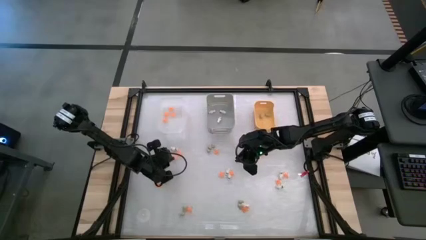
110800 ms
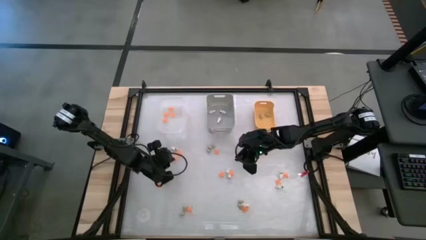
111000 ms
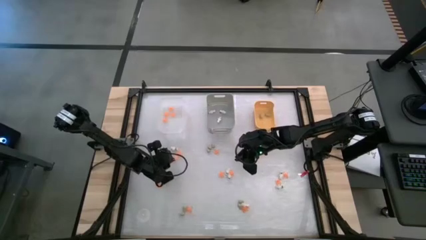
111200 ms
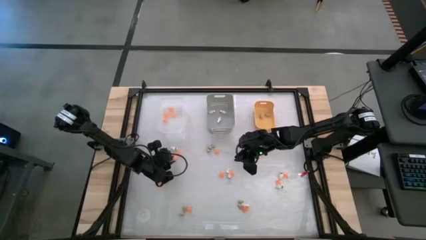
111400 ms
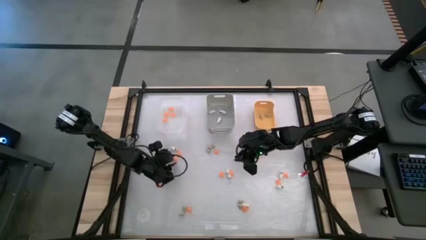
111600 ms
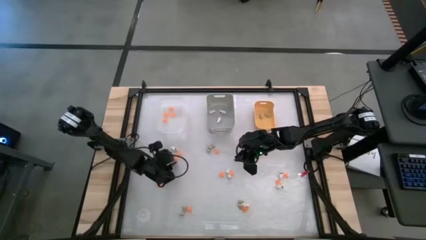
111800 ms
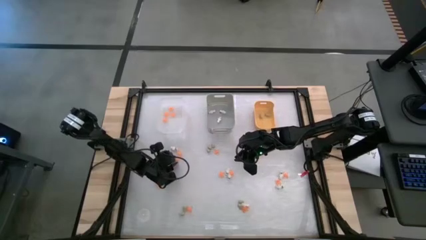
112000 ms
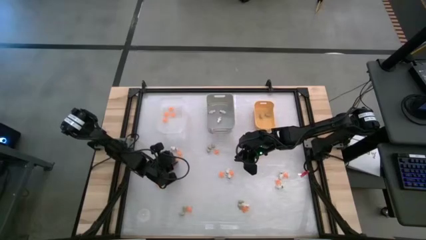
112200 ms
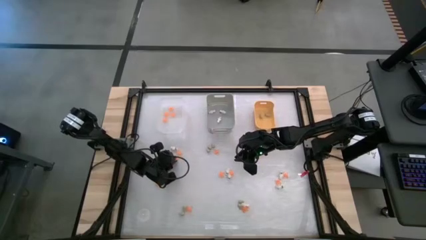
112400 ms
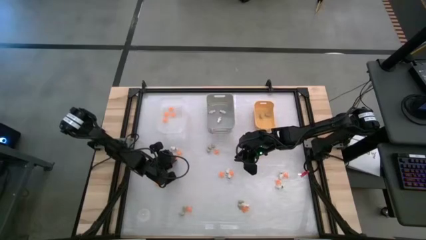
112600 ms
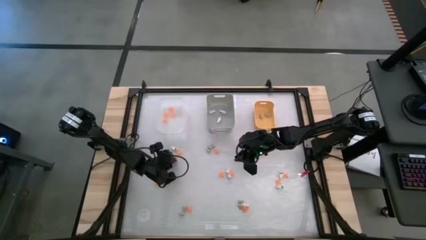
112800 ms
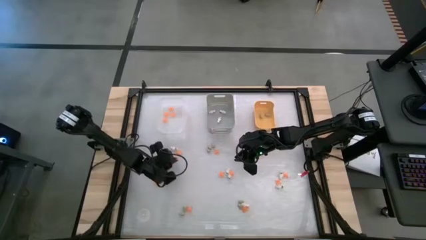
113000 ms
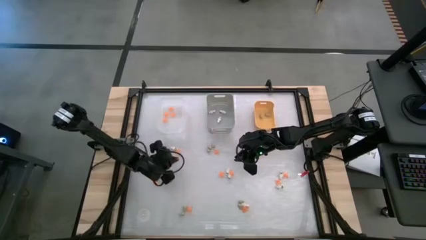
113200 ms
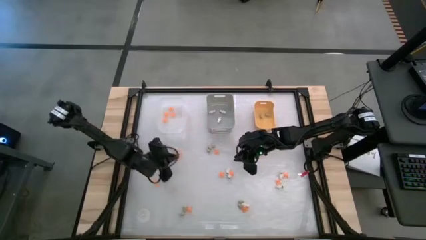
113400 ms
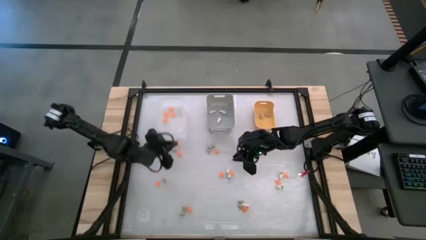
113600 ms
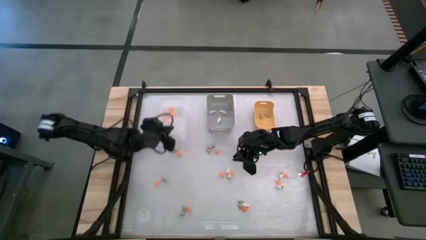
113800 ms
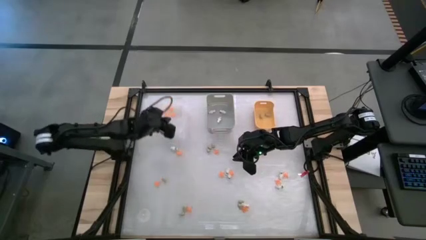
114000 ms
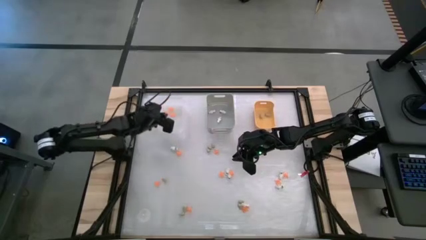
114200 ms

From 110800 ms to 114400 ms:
Task: Sort Halloween decoration
Put the orange spider toy into the transparent white bin

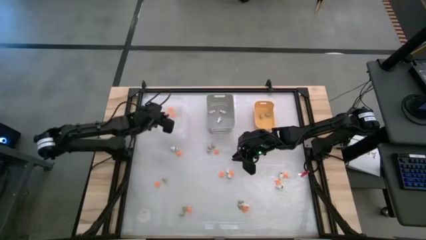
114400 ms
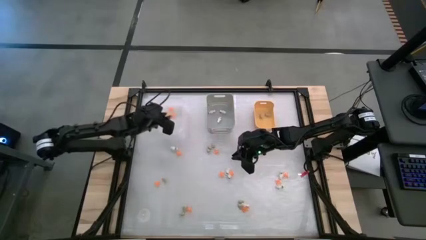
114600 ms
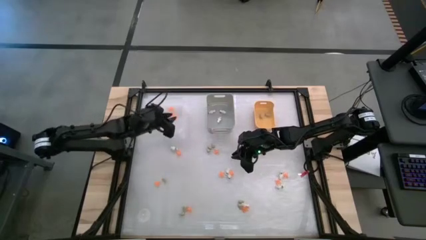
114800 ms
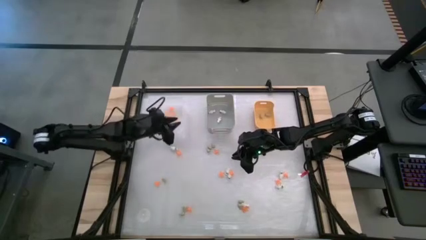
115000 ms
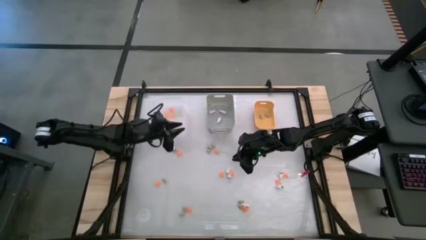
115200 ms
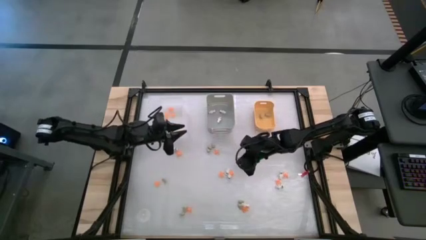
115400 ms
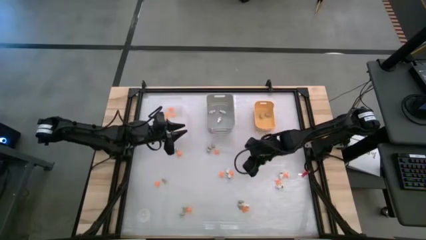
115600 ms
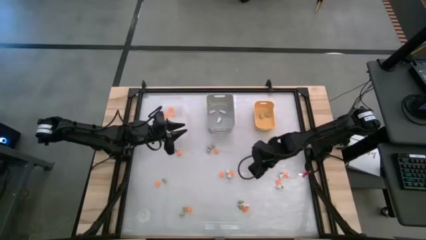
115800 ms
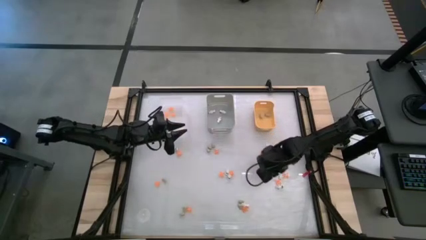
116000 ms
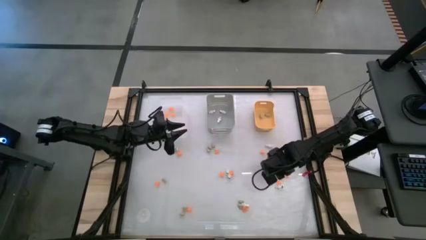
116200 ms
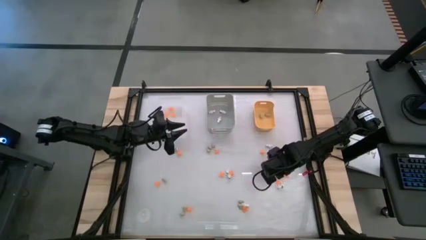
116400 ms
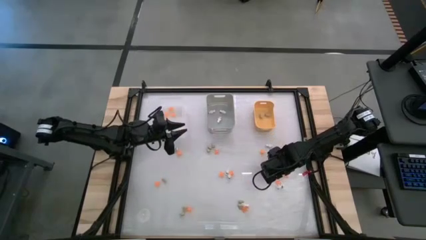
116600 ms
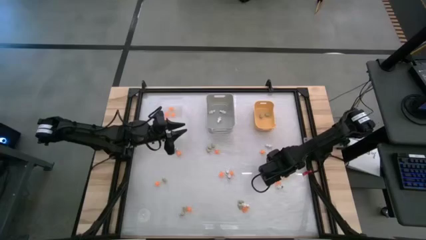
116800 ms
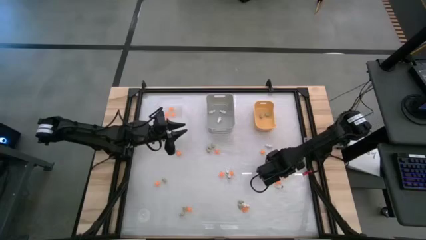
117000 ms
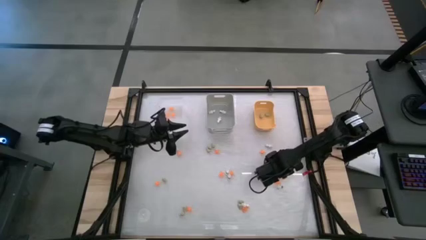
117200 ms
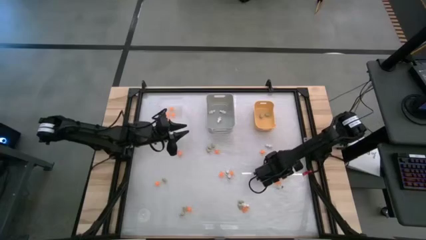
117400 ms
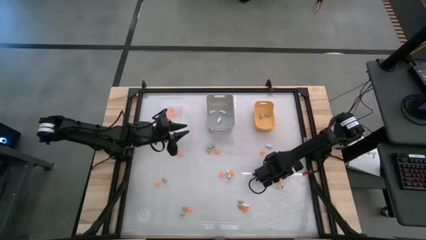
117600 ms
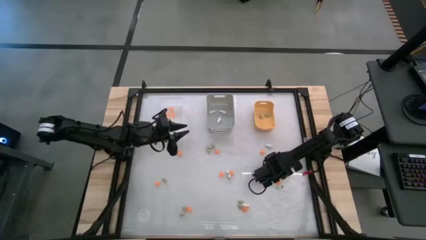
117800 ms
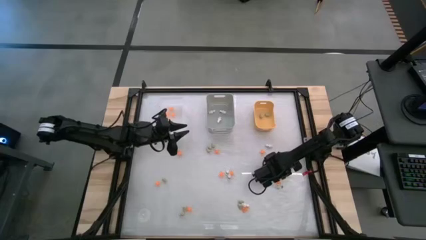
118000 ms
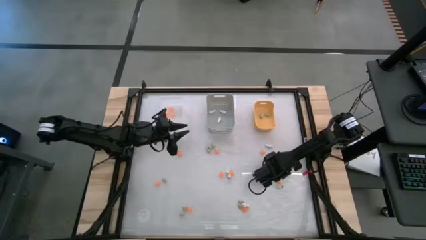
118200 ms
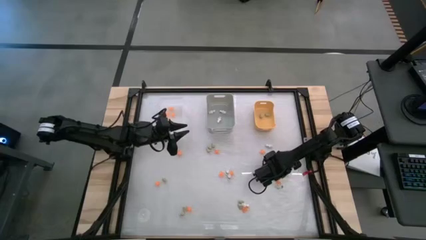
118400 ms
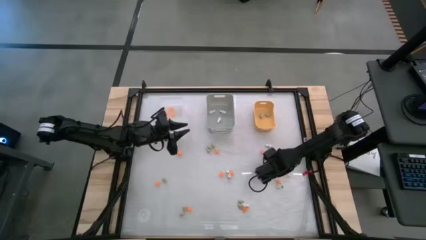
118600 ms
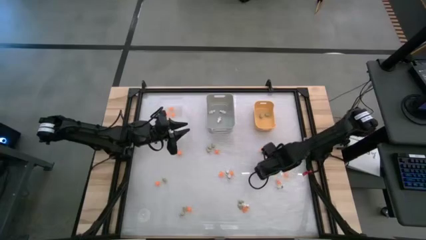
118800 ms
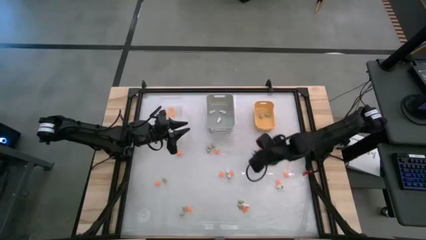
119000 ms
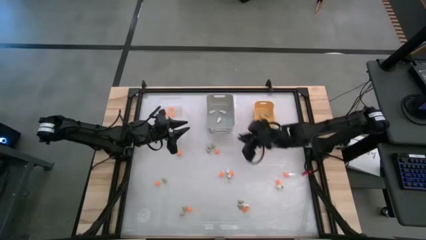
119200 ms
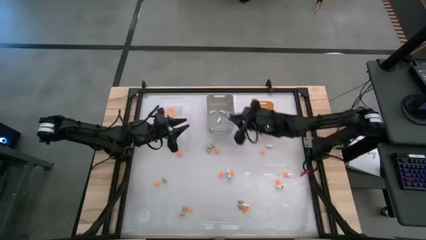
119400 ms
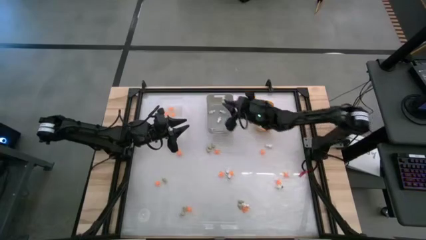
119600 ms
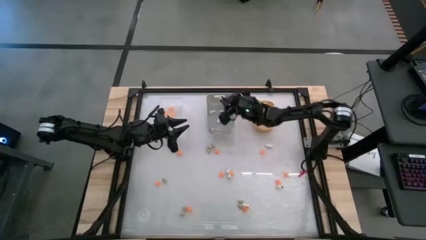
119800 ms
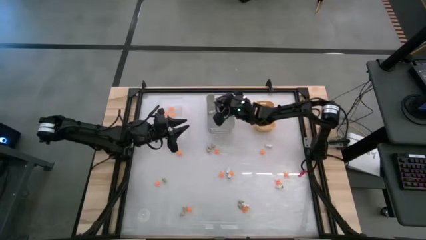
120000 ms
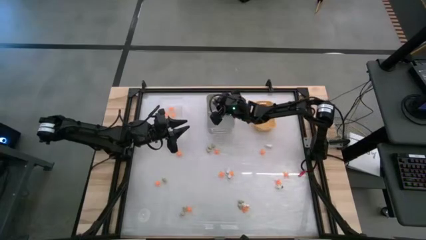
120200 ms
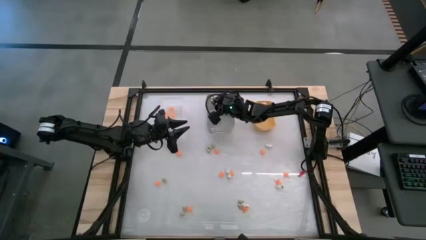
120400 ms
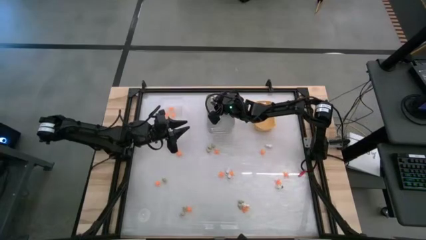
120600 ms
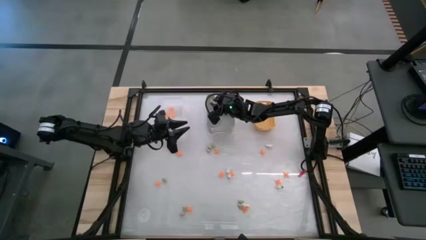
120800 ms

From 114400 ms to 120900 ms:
Put the white skeleton toy into the gray bin

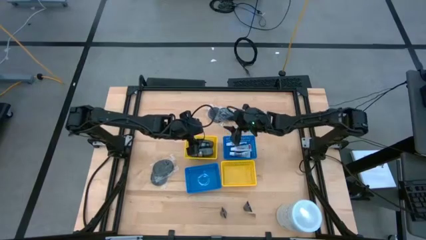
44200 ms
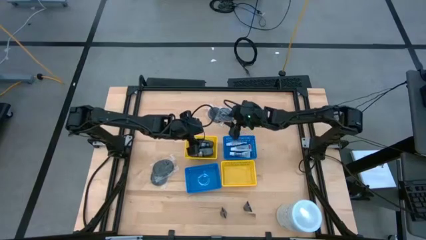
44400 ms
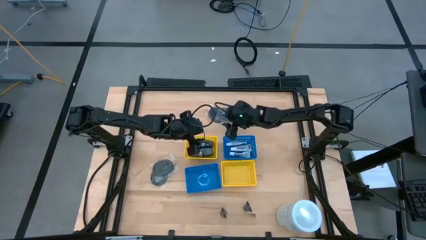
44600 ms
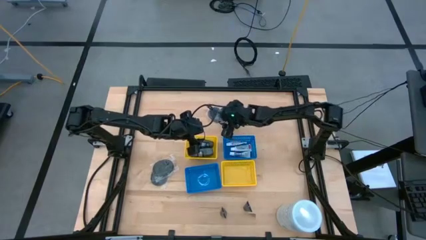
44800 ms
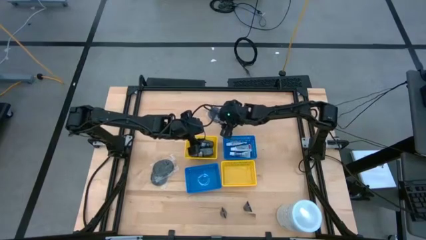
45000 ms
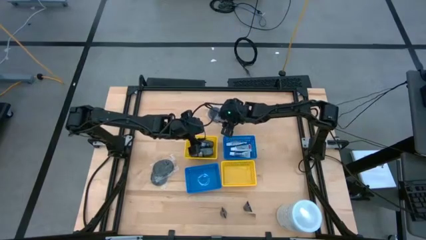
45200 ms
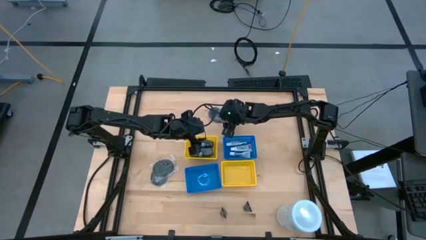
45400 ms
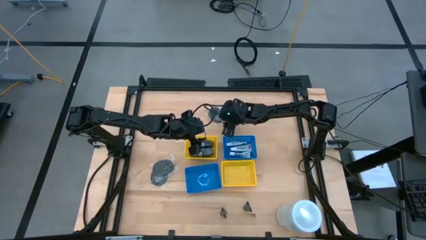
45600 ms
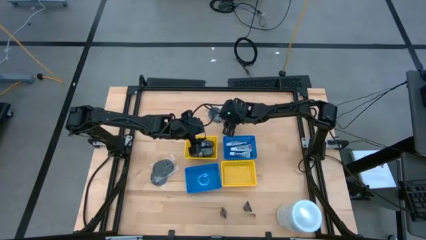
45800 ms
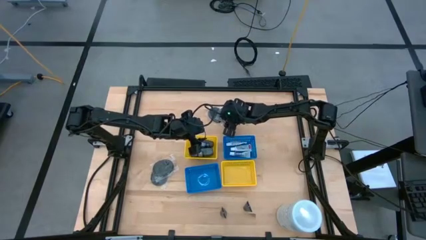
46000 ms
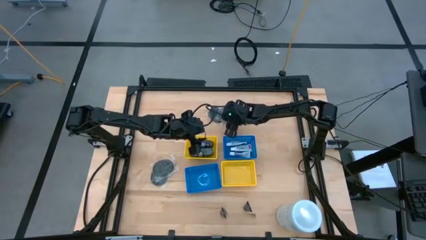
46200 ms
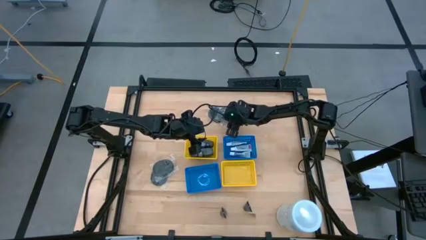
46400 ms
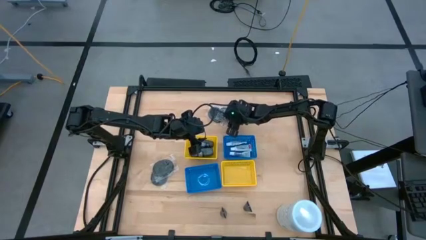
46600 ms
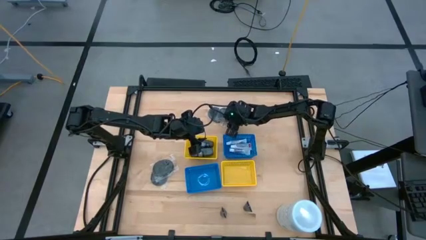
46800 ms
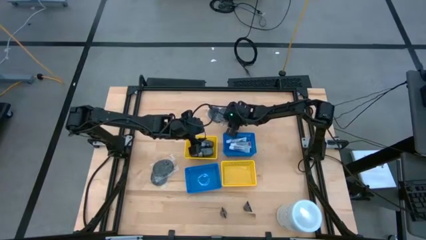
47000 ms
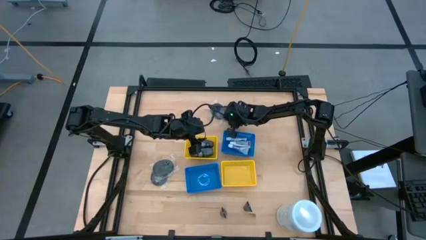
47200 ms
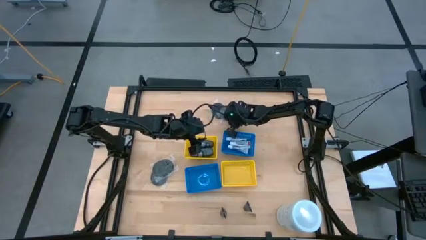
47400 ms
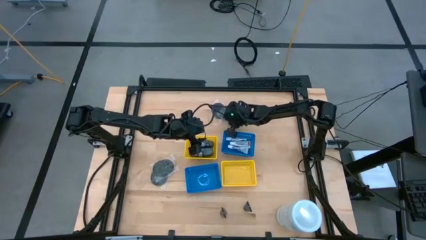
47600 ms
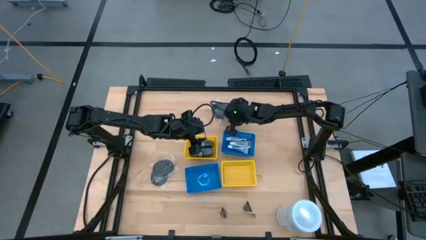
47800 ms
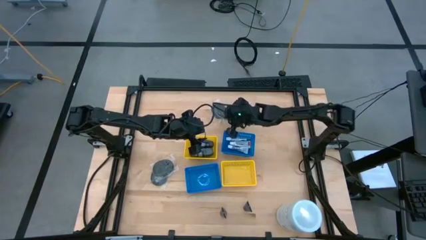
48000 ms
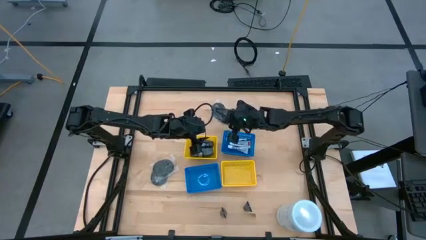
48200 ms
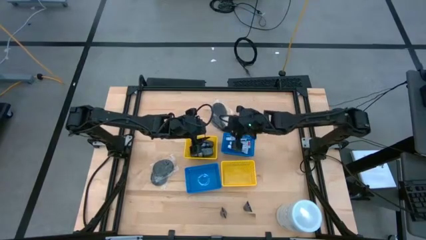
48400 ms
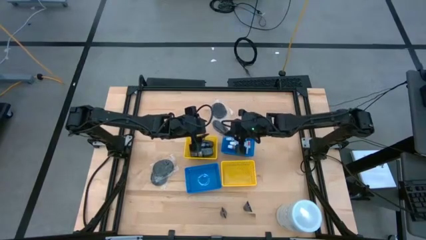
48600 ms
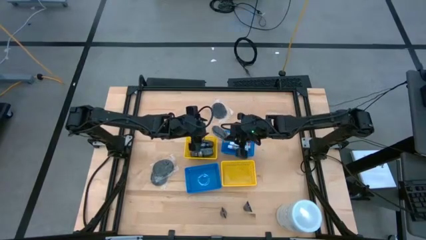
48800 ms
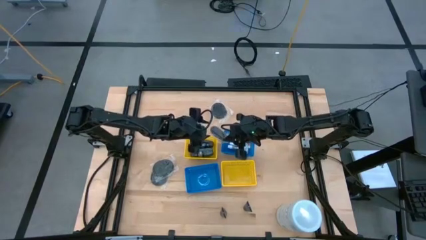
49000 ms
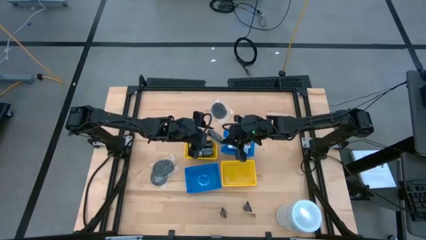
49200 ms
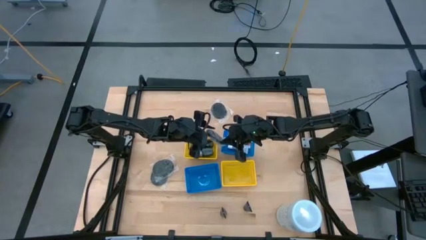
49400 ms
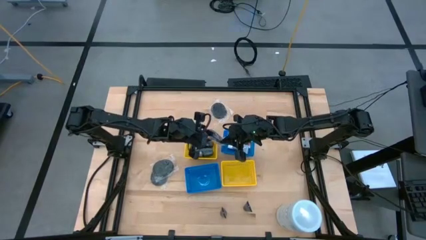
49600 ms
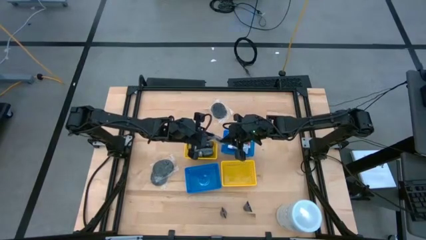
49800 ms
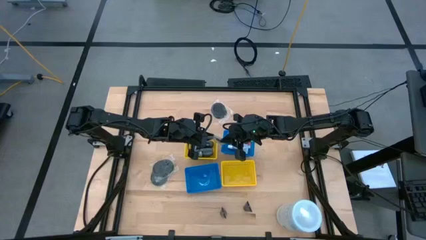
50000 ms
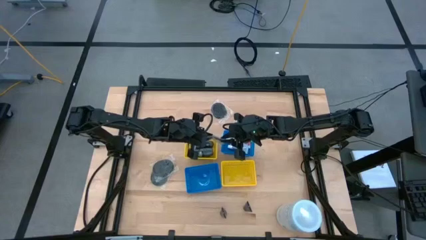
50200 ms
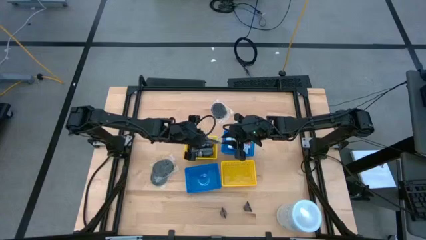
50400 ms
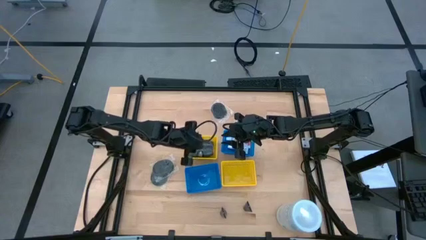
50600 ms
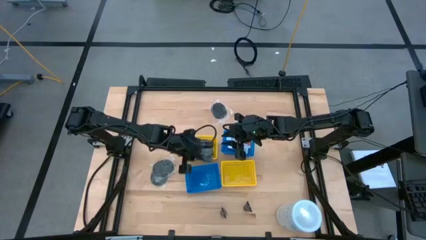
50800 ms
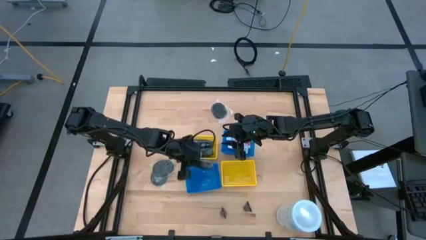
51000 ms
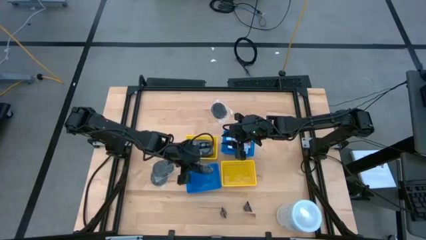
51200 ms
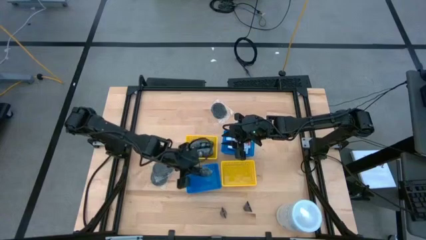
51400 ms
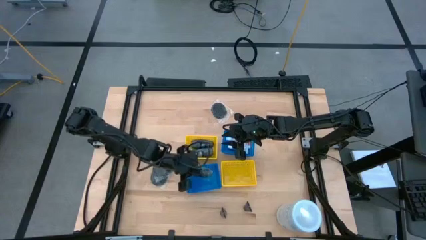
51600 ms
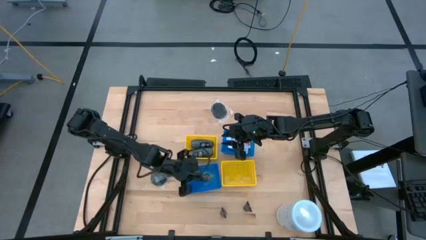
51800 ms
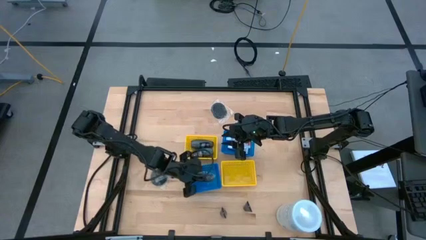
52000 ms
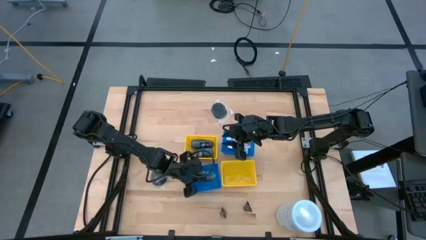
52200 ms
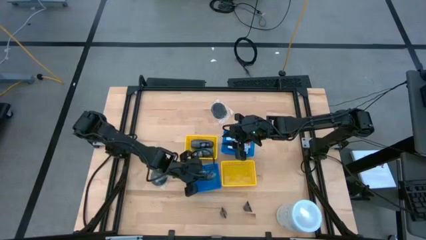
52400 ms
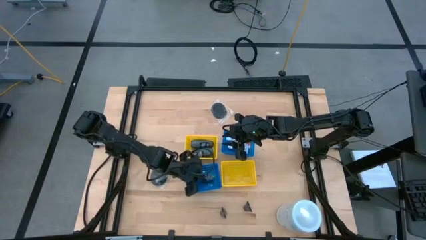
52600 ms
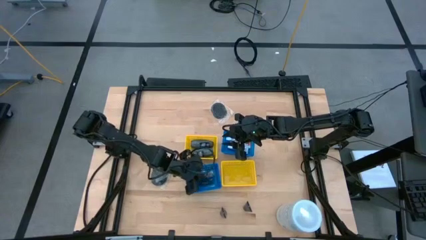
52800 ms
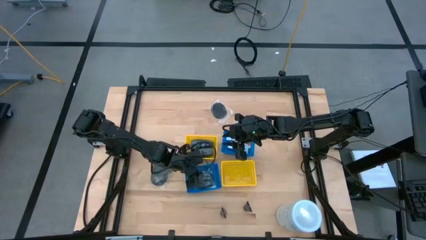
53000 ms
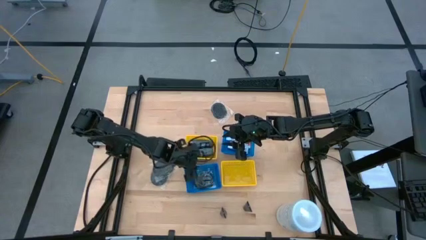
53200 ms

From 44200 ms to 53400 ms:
Task: Pick & Place Travel size toiletries
Put the hairbrush into the bottom left blue bin
